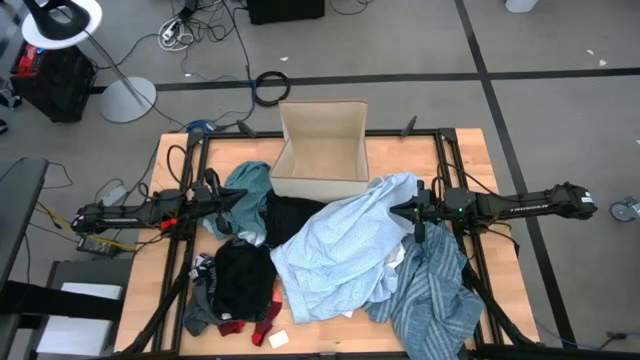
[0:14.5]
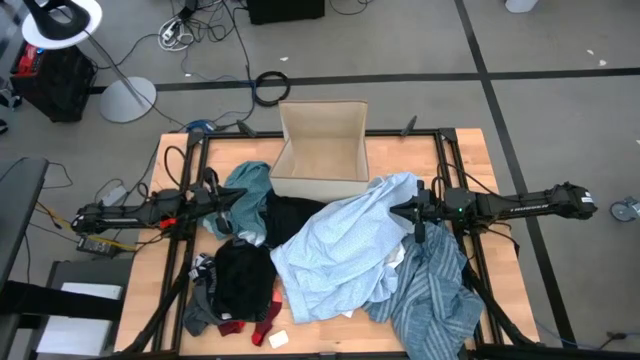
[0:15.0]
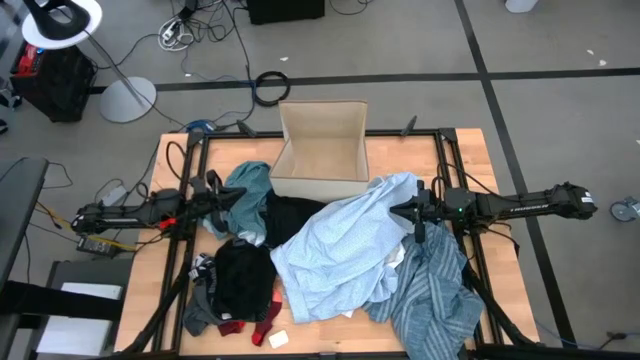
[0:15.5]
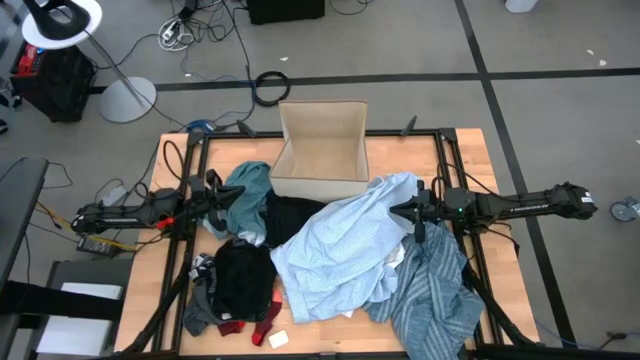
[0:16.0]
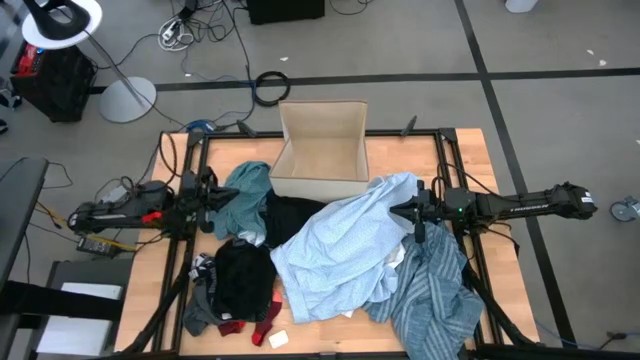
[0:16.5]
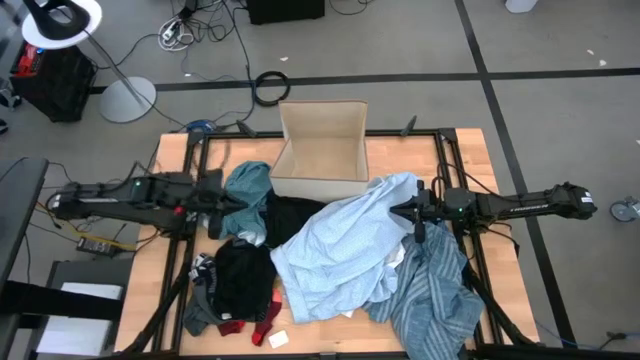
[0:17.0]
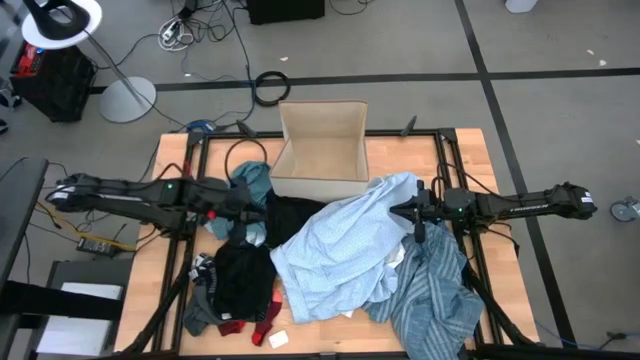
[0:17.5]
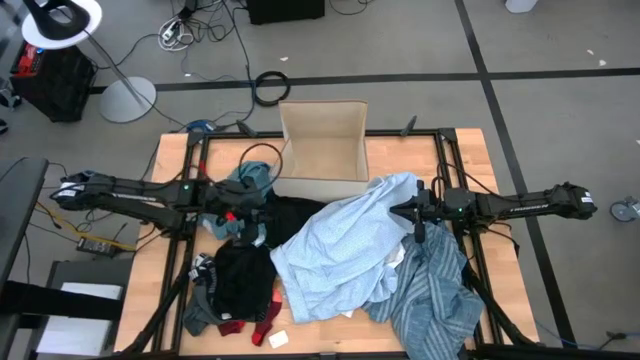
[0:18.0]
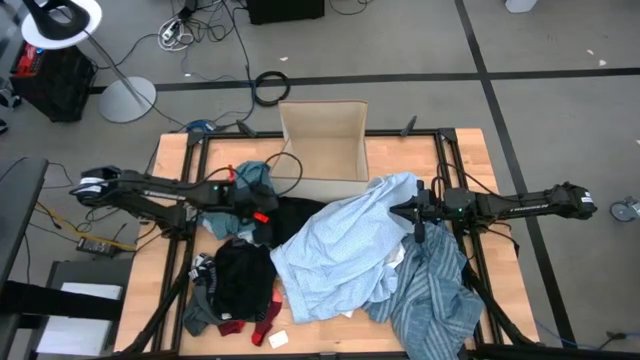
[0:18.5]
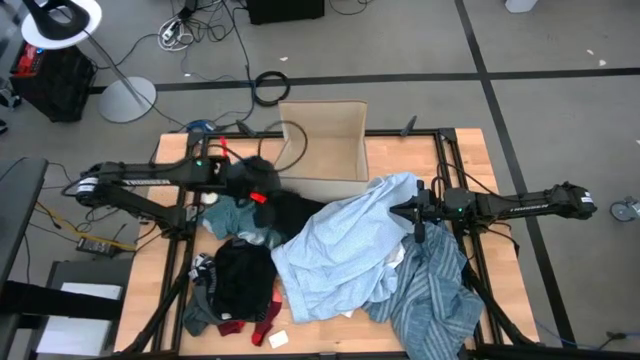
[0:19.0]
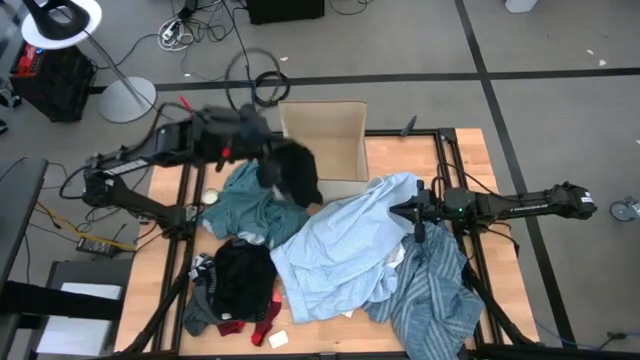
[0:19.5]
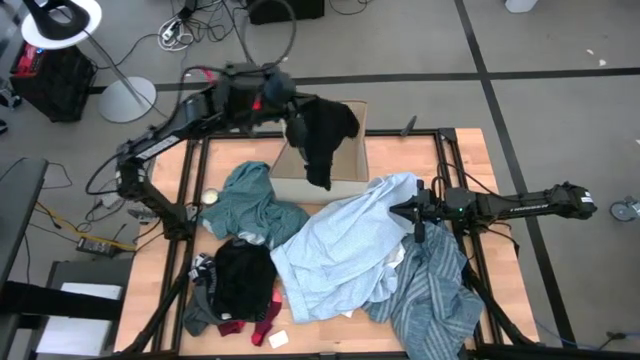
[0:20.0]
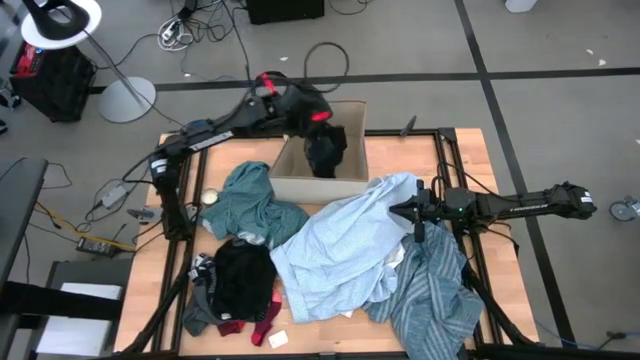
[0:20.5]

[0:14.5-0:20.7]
Task: Sort clothes
Put the top black underwear into the laundry organizer

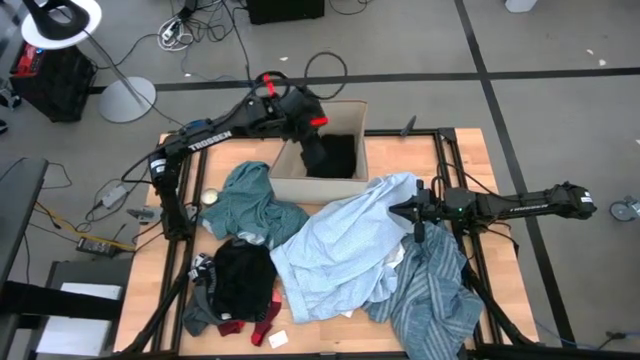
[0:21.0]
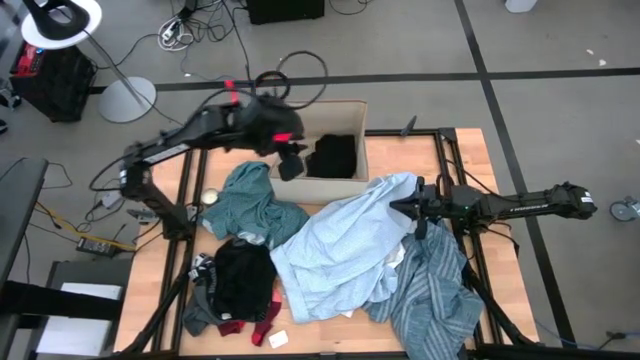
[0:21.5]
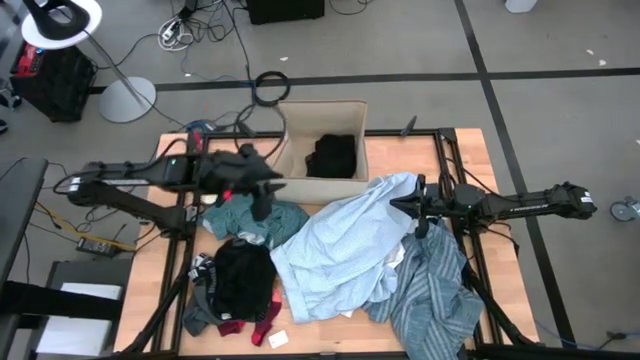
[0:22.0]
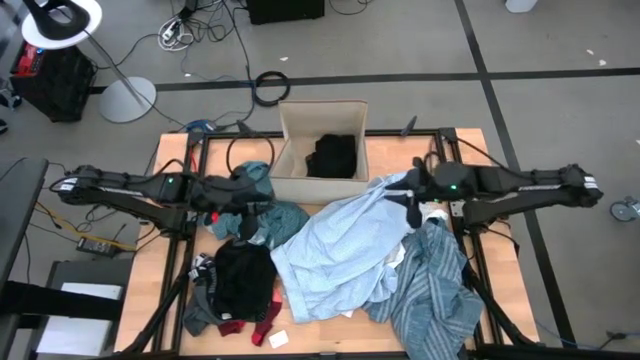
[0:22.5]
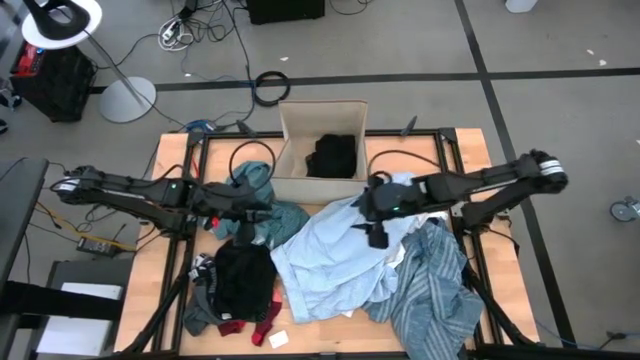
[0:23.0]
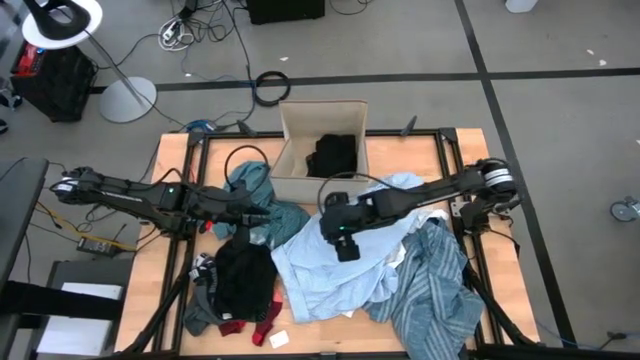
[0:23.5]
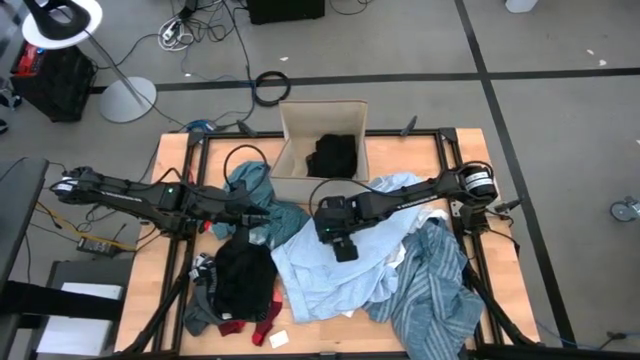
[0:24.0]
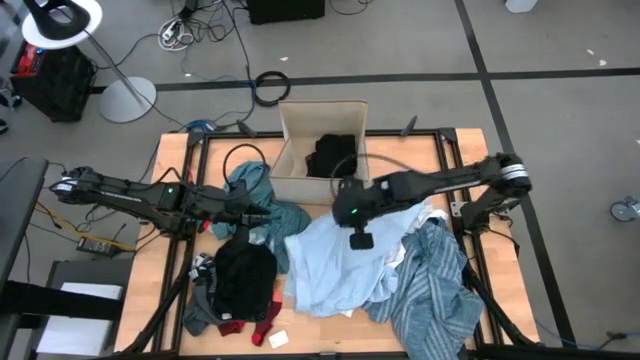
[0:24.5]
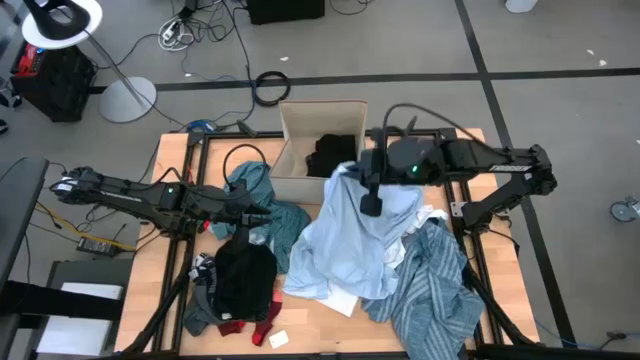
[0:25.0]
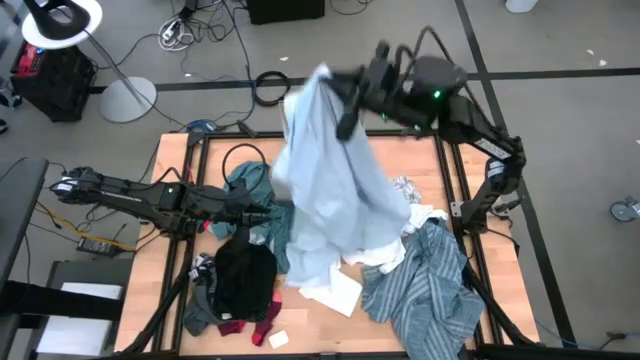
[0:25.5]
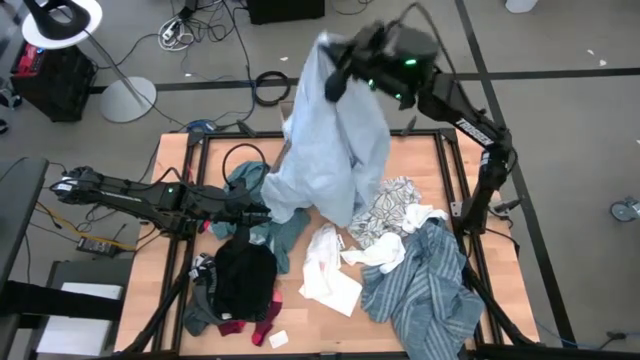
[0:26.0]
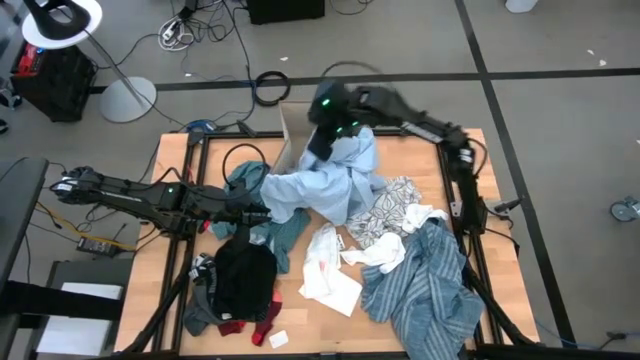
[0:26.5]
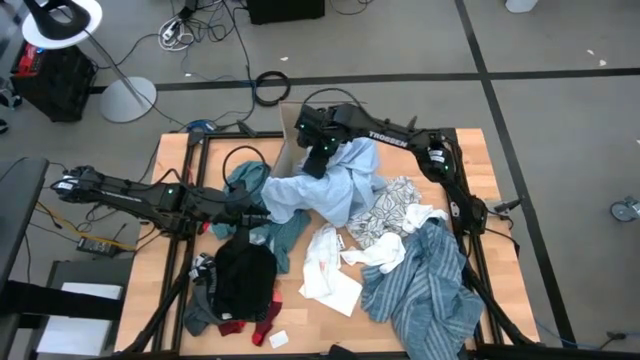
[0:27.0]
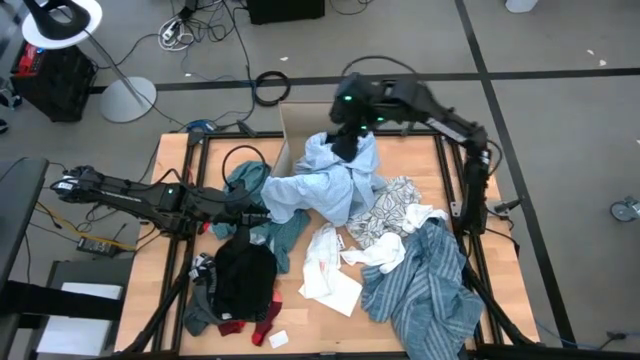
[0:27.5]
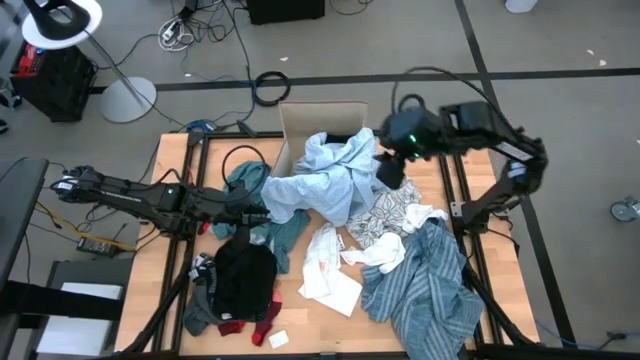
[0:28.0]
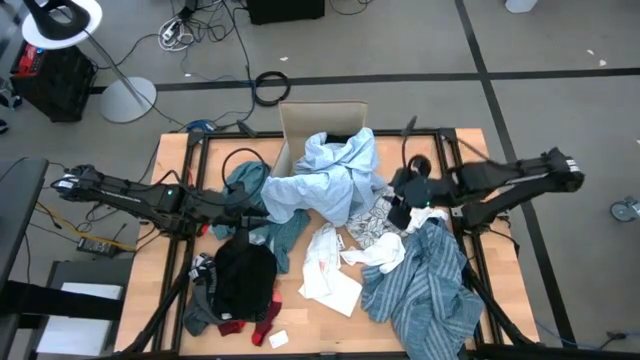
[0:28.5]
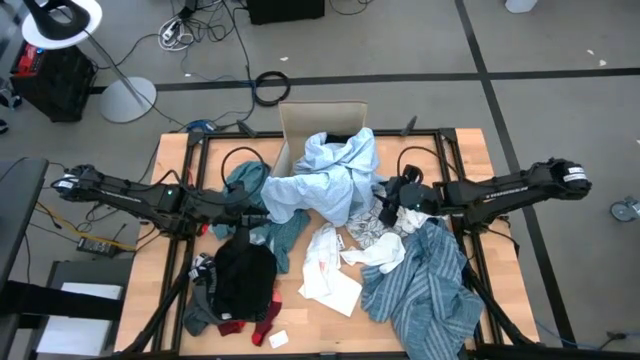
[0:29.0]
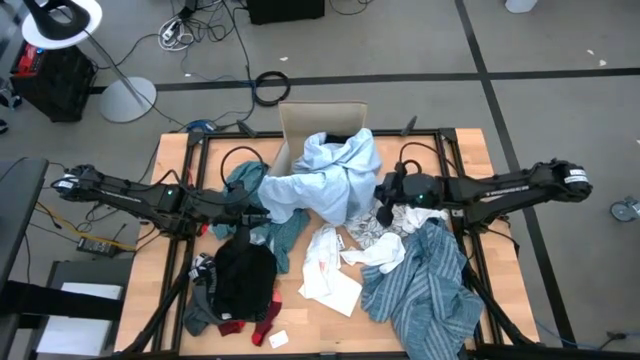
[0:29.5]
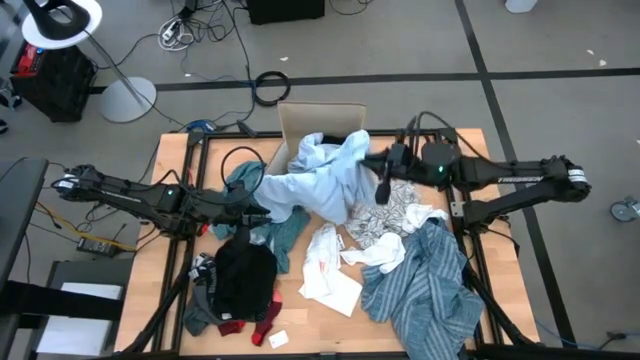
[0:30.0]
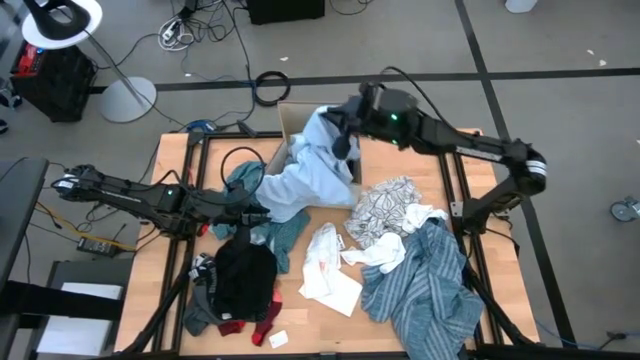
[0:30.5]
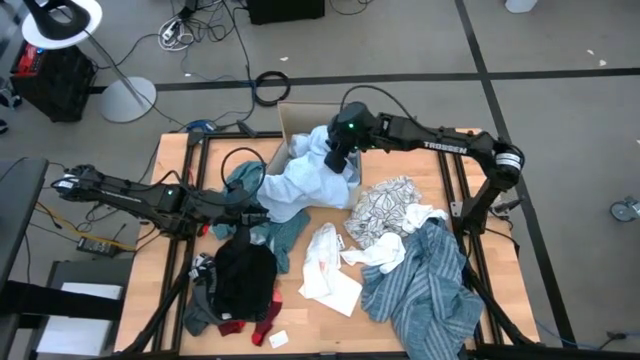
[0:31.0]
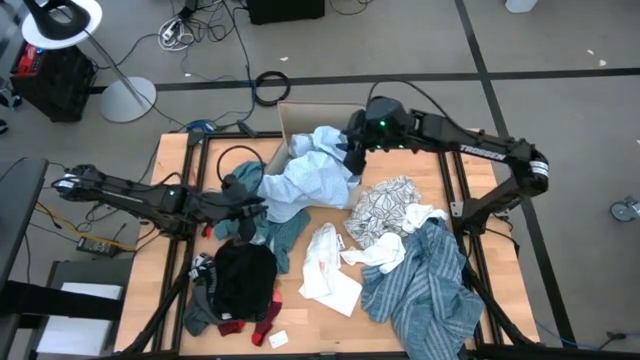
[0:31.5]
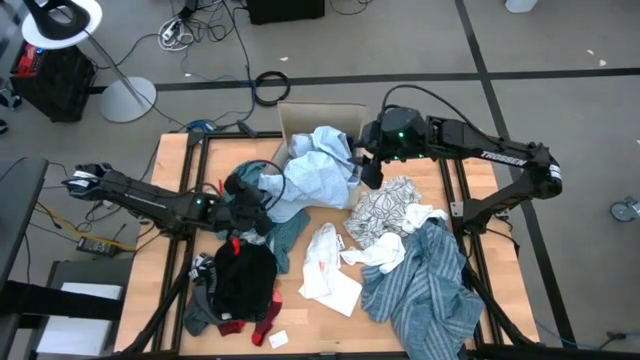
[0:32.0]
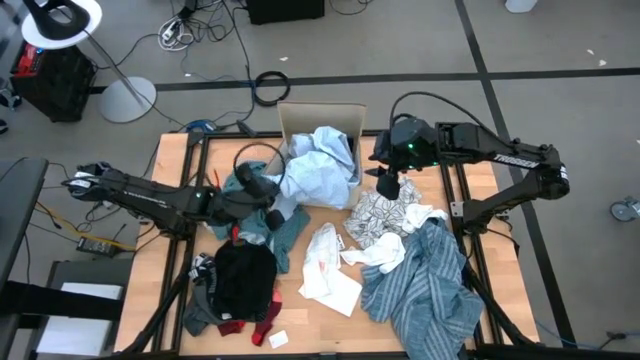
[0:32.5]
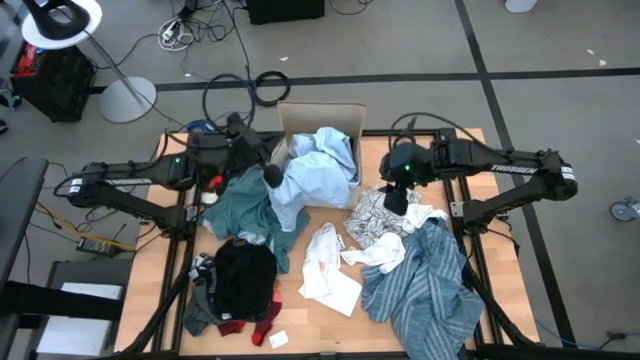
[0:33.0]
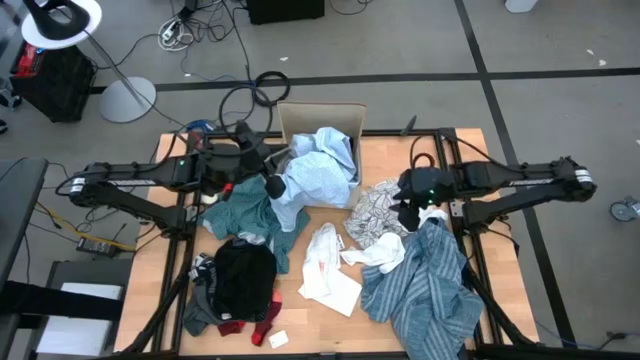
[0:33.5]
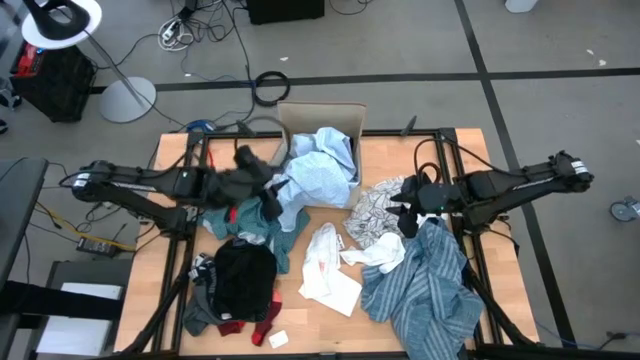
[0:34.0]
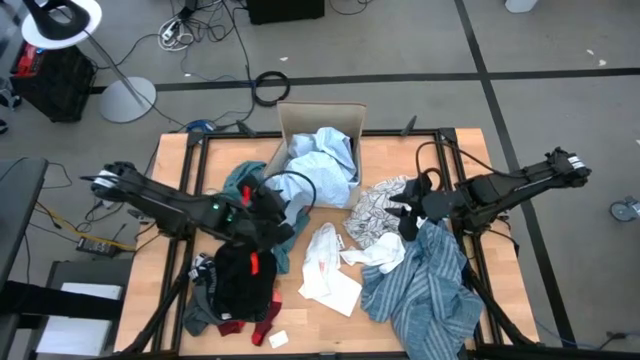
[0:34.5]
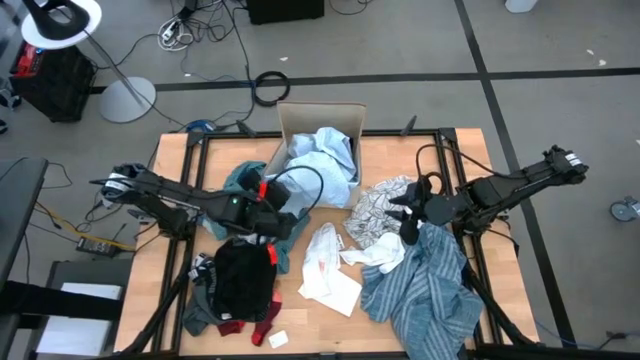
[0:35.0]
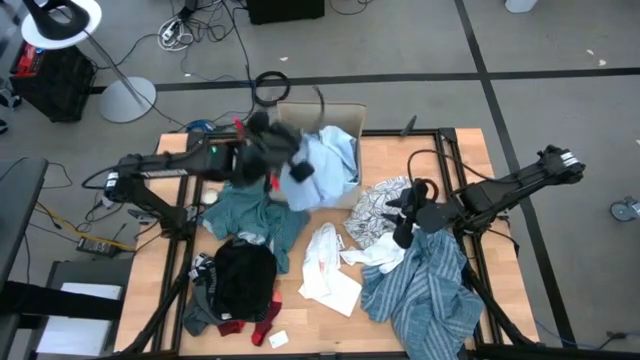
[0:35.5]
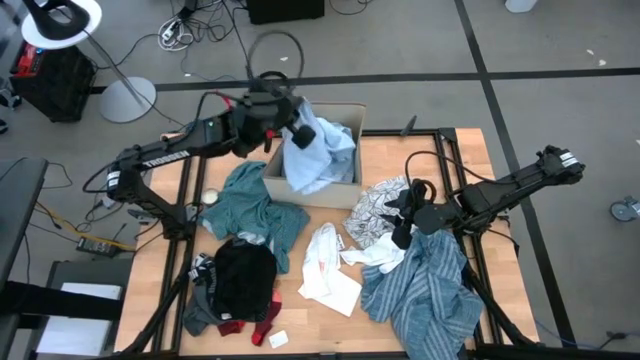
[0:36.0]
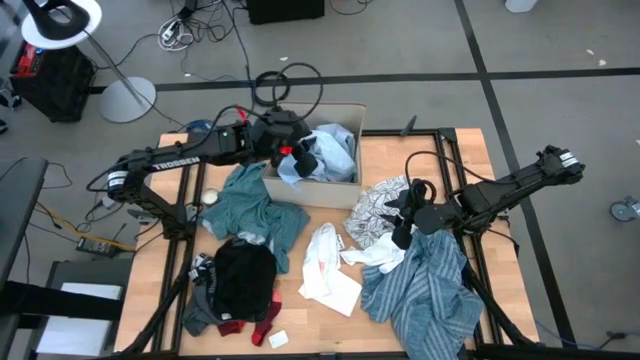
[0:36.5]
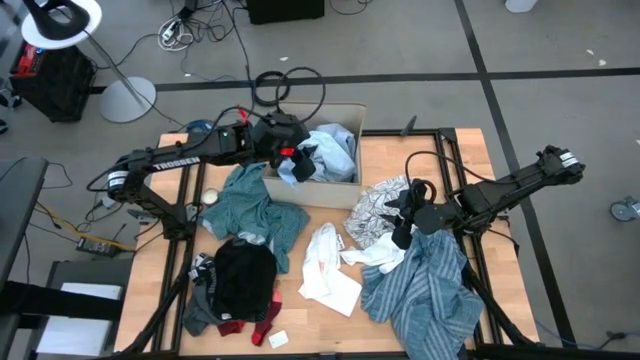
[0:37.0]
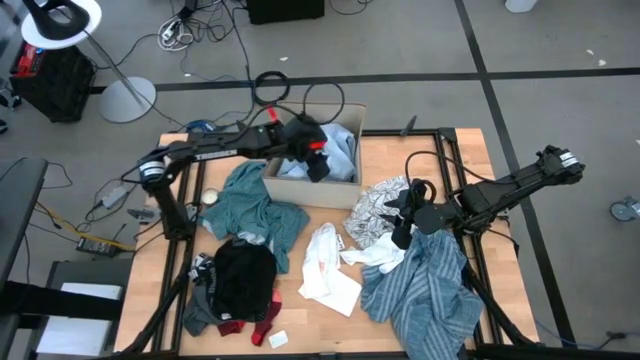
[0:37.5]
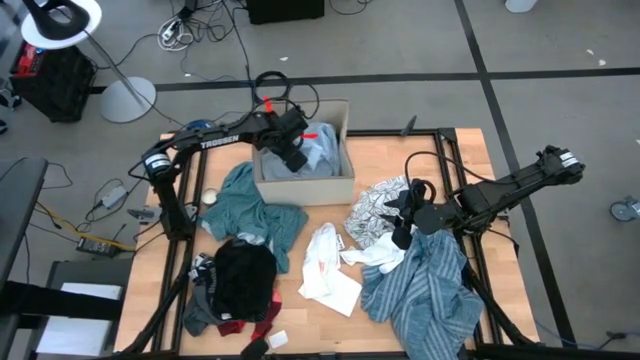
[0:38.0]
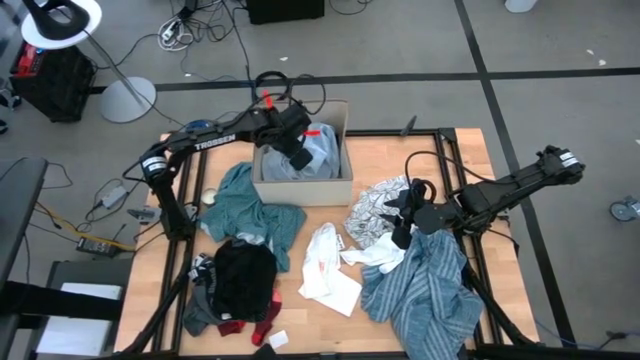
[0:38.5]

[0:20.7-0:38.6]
Put the light blue shirt into the laundry organizer
